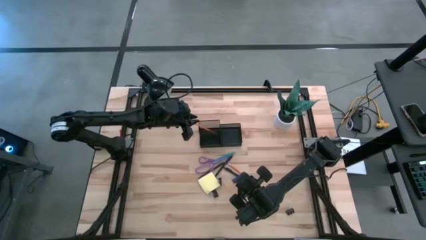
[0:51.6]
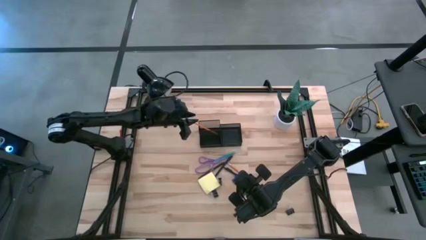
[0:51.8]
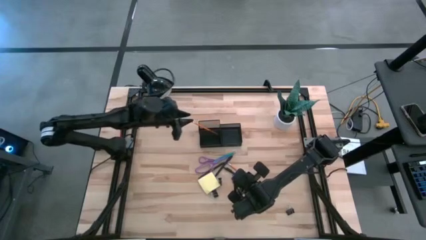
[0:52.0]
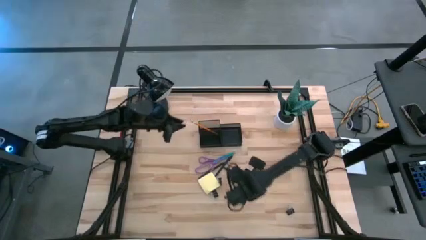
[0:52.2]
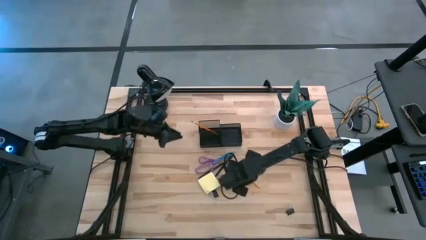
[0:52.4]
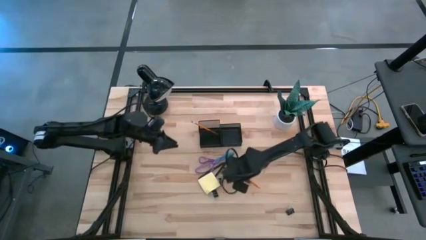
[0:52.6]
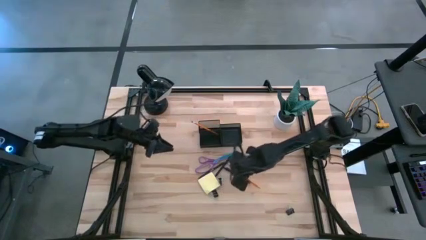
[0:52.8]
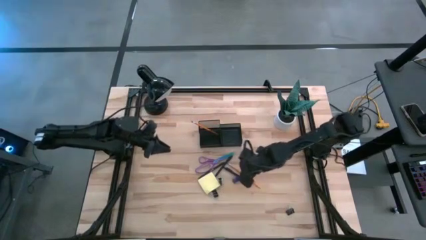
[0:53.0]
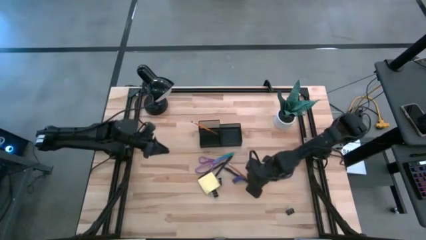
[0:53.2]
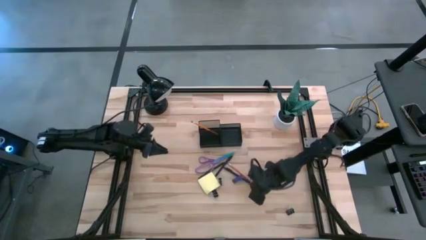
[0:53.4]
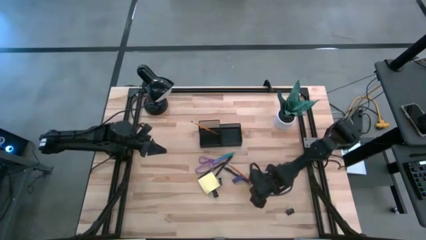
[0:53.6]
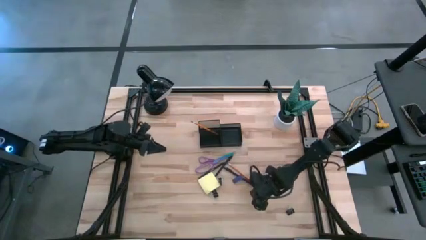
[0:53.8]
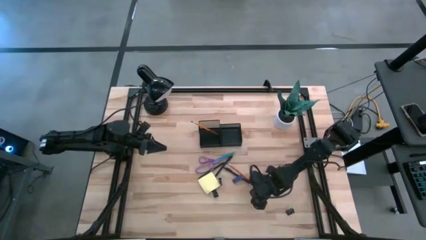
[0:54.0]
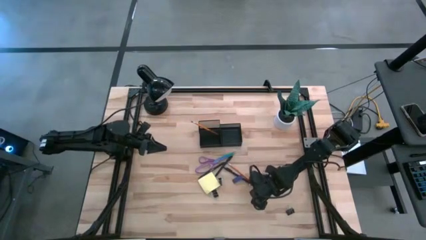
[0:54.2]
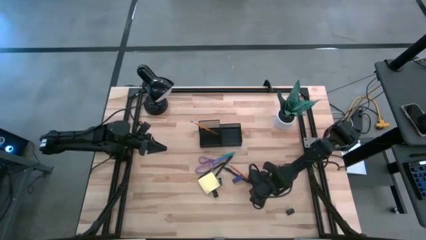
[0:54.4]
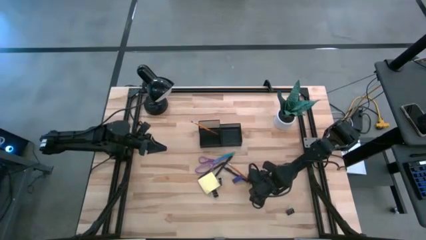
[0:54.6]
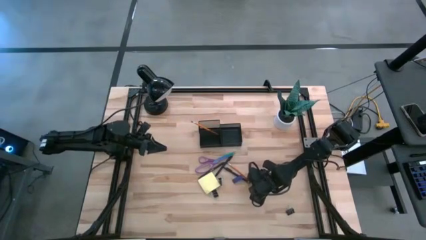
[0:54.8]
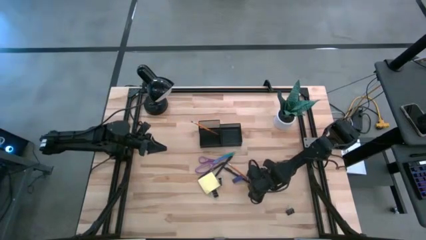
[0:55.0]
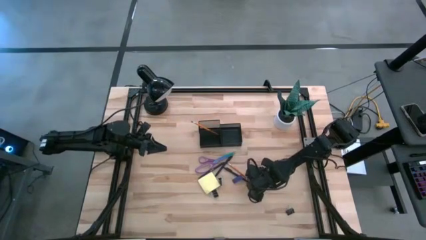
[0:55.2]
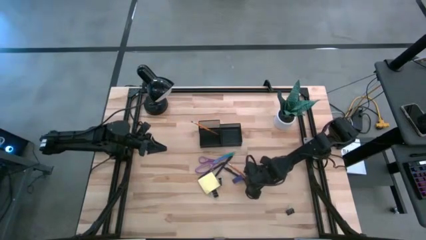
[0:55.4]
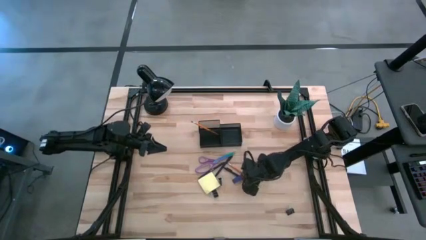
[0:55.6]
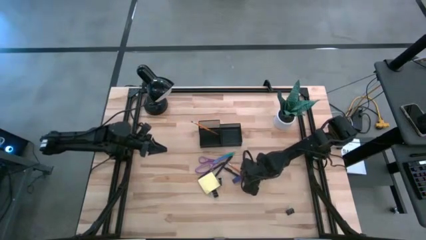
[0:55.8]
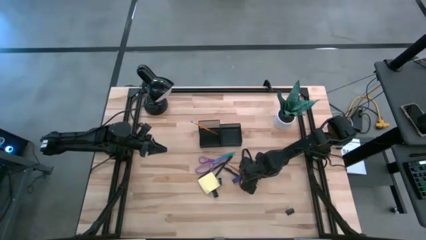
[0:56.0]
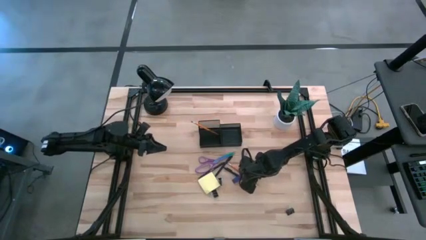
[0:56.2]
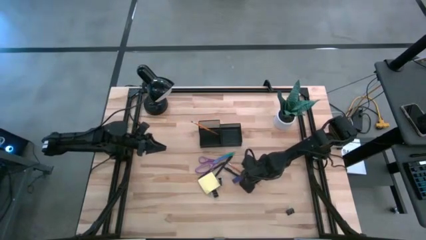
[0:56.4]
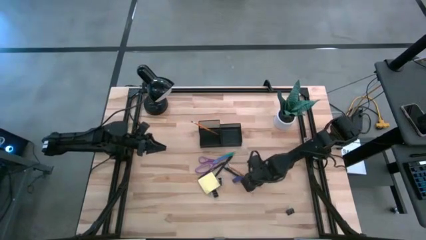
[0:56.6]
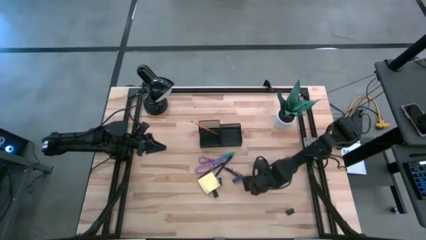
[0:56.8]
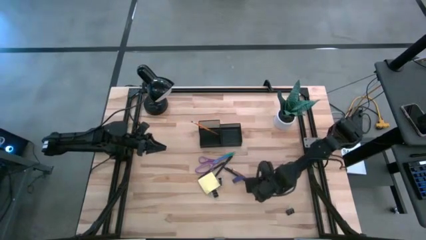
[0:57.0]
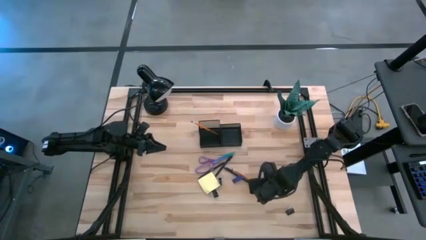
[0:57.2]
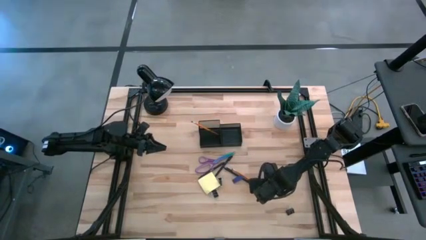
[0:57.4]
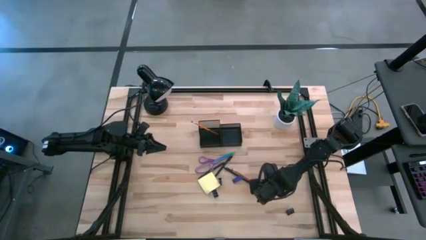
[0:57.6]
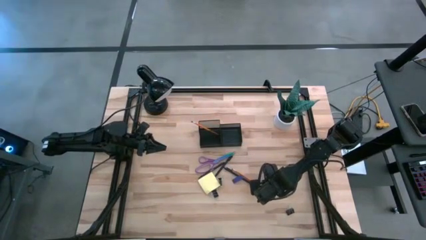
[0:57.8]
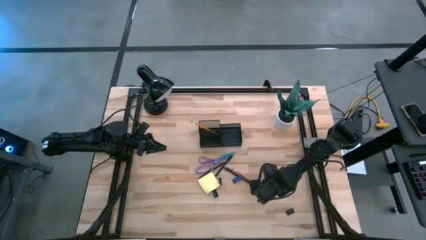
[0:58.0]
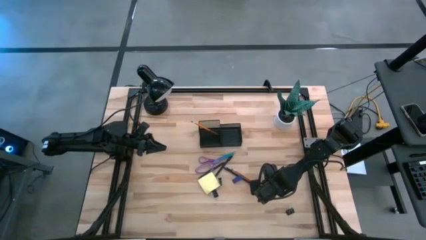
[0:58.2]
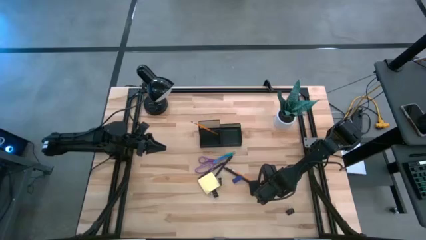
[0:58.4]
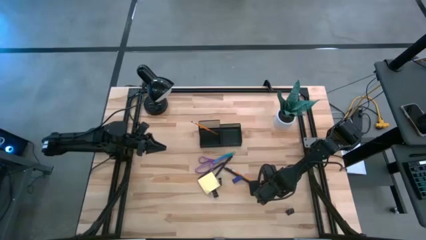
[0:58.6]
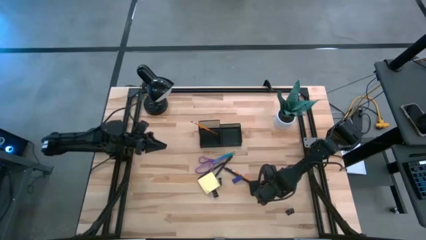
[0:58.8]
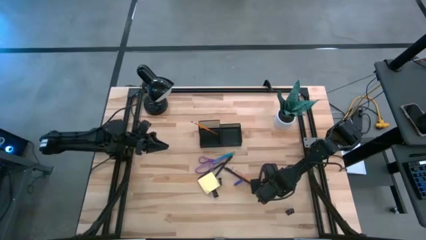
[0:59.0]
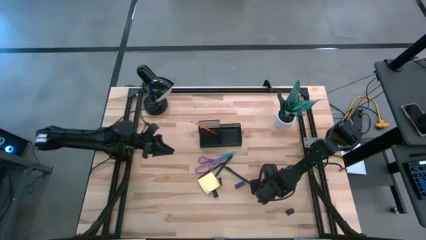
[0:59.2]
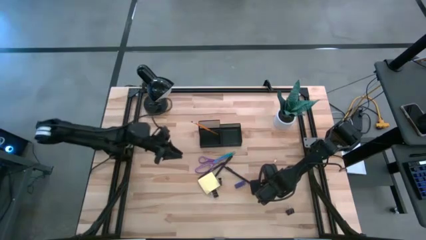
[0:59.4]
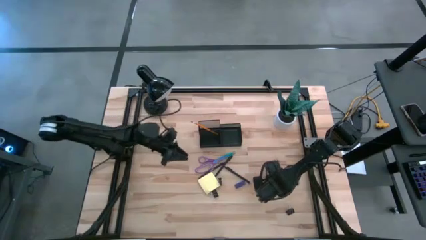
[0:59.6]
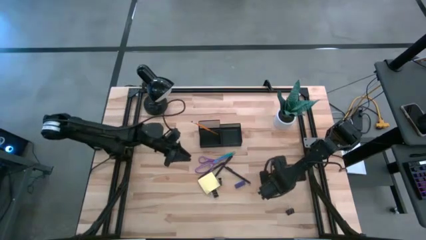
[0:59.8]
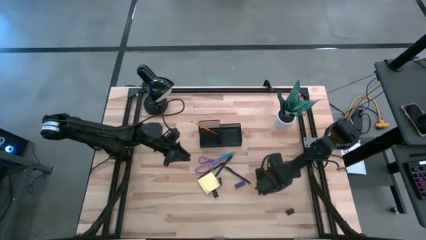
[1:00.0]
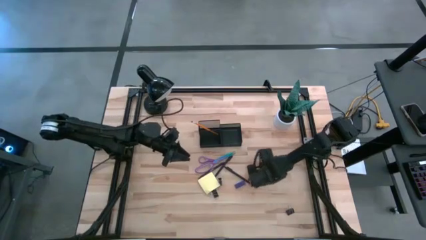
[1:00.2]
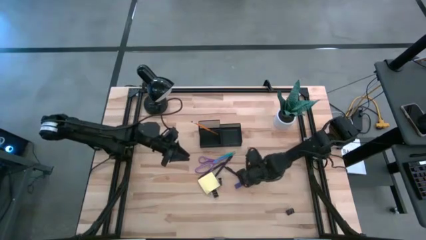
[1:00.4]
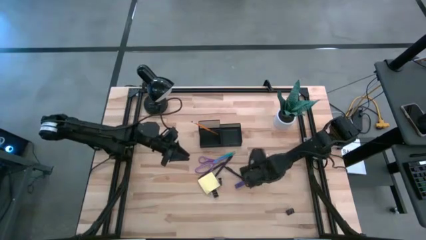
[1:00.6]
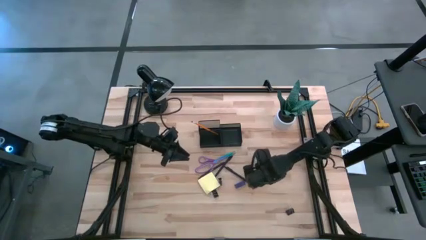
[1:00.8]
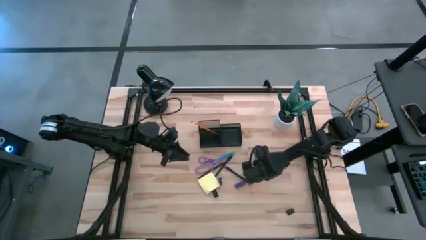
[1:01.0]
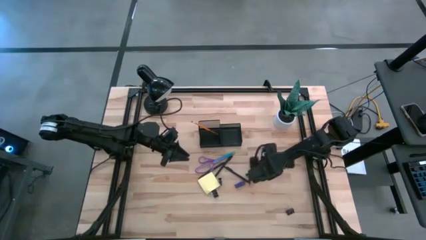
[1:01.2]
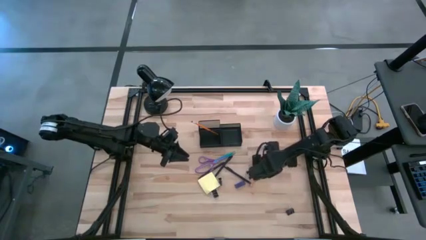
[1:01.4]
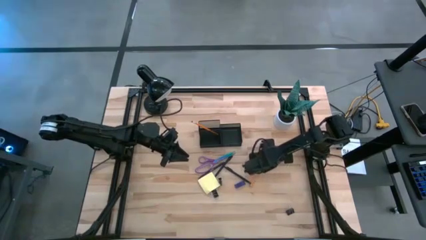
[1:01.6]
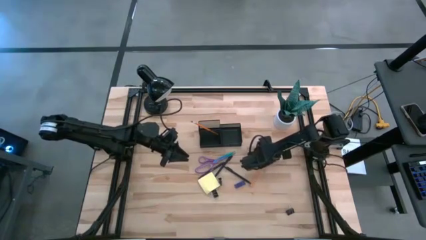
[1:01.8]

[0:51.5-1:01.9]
Task: Pick and place office supplies into organizer
Put the orange pencil into the black desk organizer

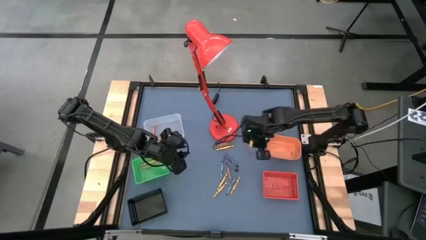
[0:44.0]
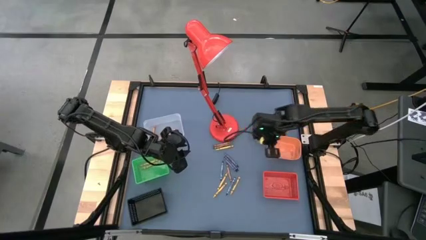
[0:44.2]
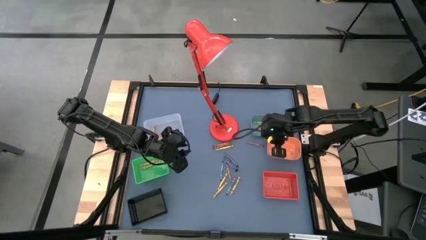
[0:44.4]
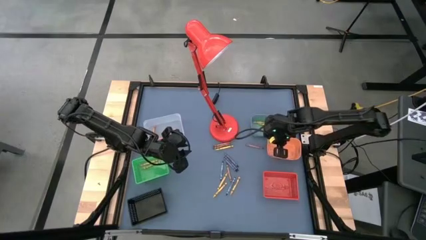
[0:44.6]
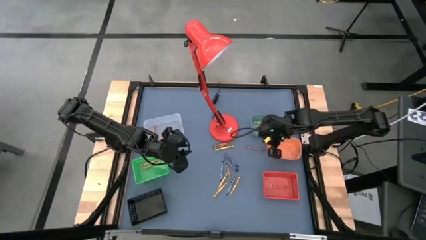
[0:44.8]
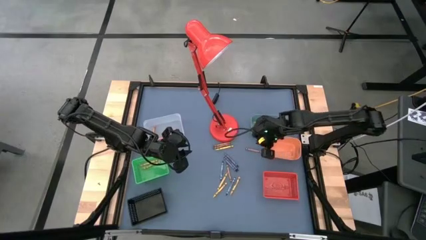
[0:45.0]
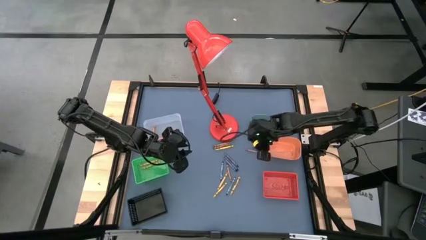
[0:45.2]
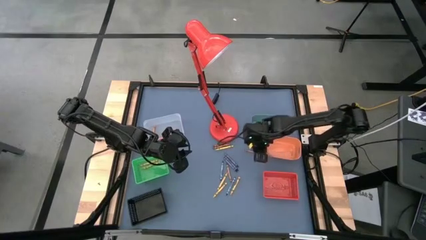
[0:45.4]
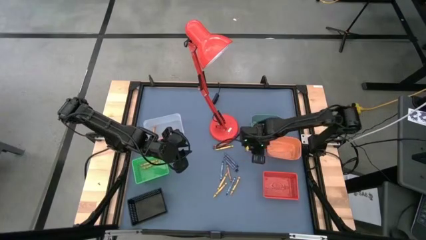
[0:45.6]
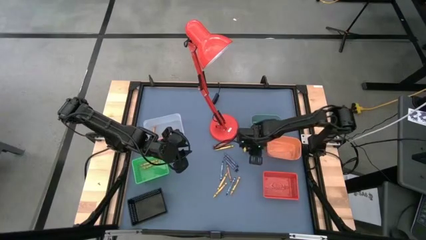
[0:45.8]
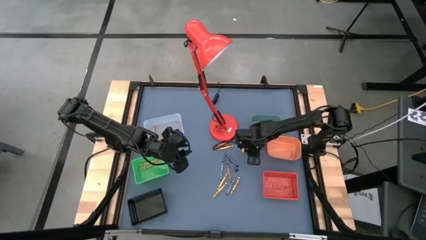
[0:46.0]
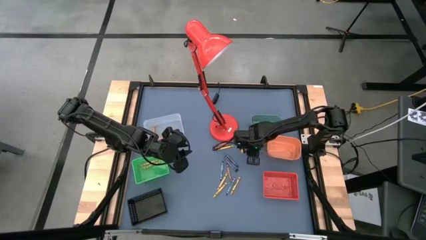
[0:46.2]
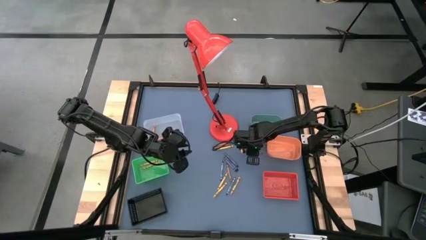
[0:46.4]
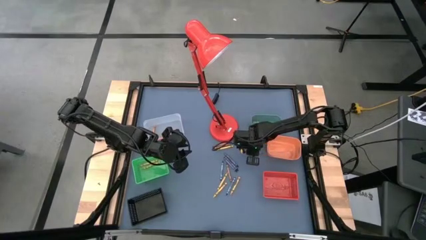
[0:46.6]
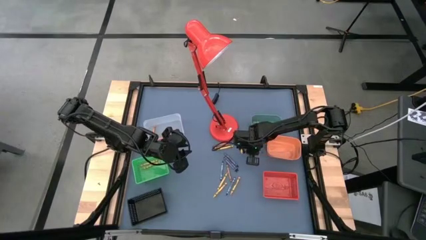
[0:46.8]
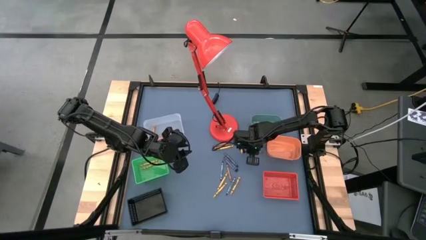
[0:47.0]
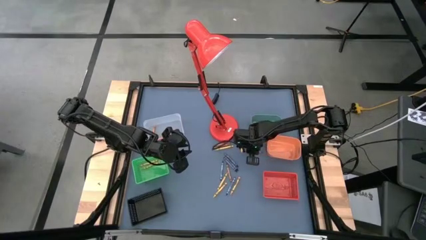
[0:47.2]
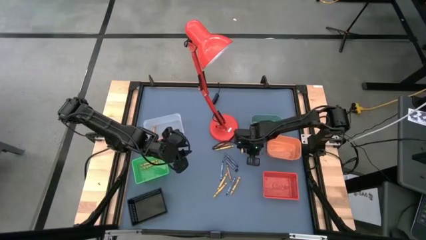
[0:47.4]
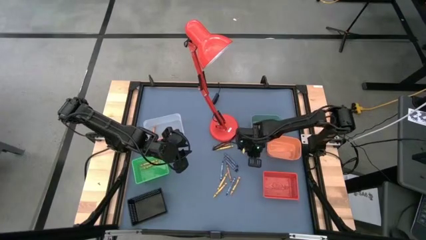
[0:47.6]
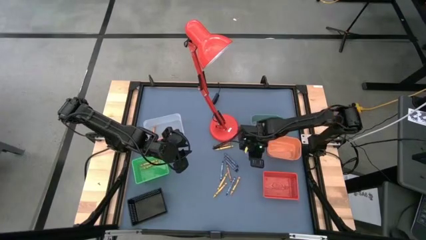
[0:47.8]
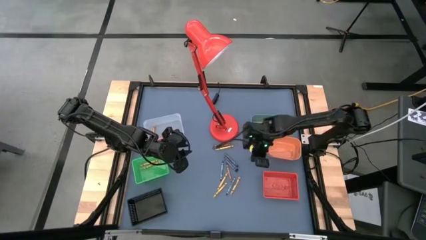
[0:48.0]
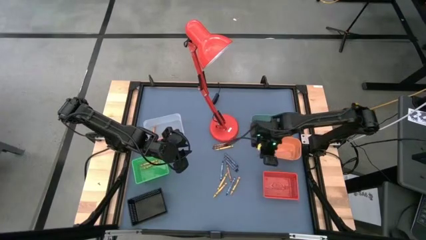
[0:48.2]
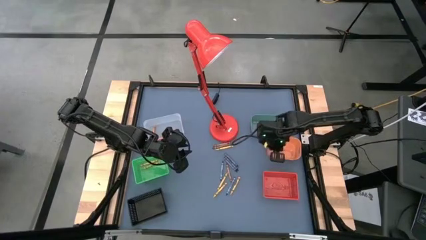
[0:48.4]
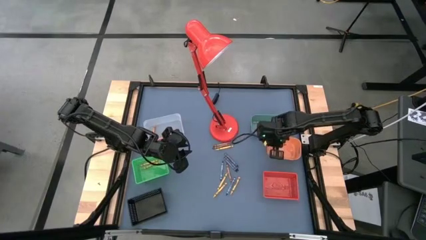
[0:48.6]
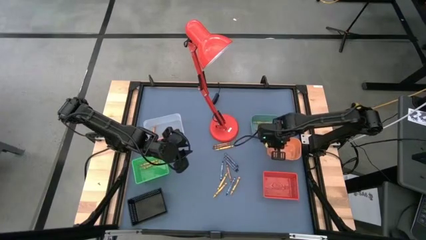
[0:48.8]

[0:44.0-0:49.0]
Task: Sort crayons
Put the brown crayon into the orange bin

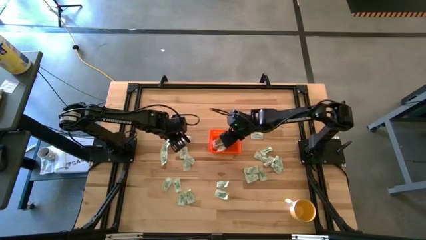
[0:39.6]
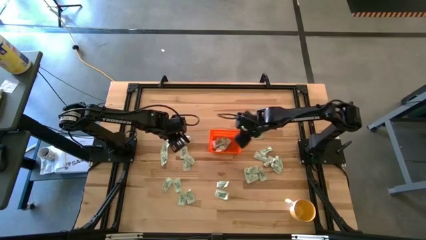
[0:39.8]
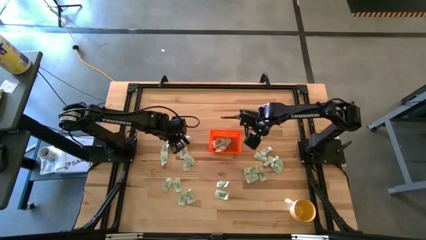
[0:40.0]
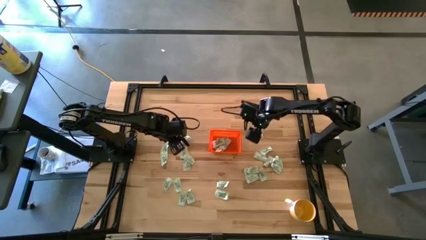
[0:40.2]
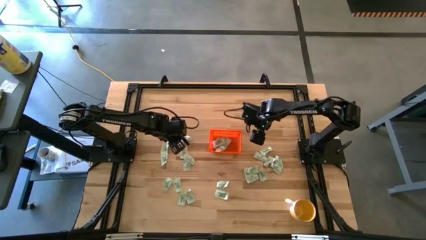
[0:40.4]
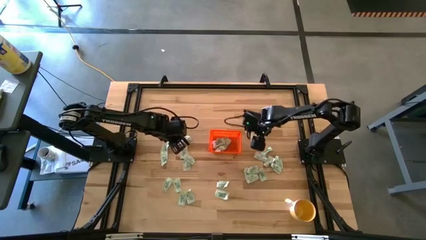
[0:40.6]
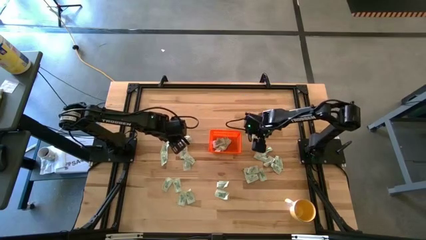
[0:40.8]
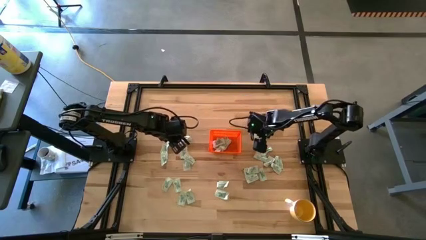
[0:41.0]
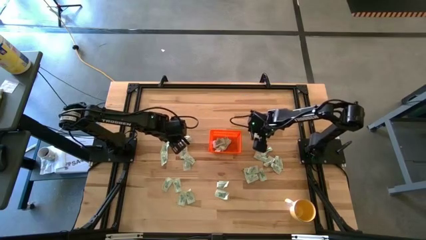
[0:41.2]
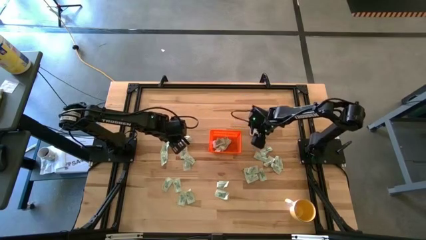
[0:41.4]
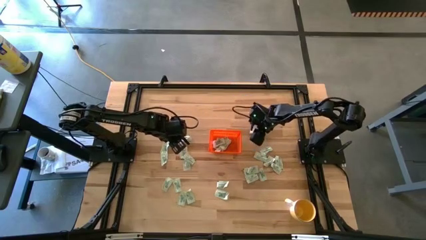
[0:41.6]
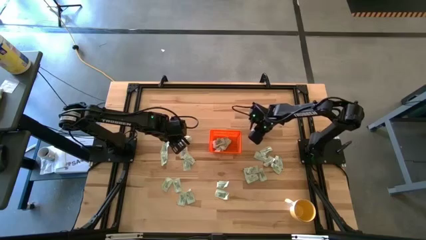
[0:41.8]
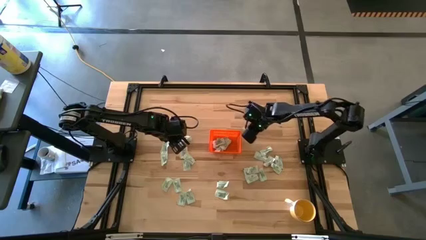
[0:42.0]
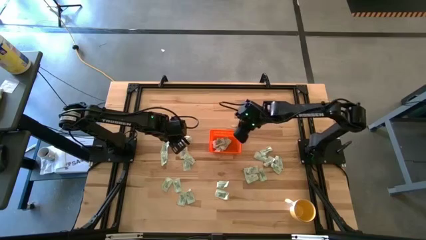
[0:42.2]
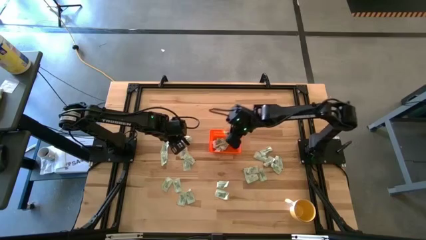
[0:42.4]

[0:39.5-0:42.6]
Task: Pick and place Stevia / Truvia into bins
Put the light green stevia packet into the orange basket
